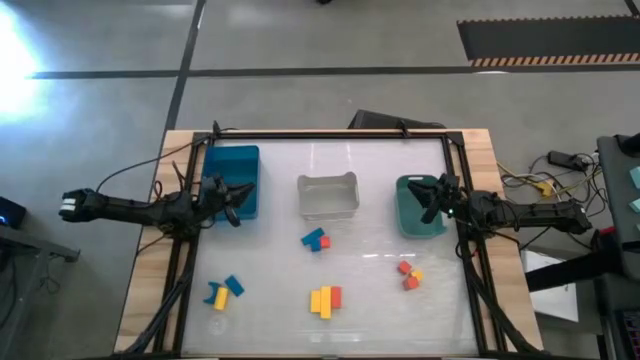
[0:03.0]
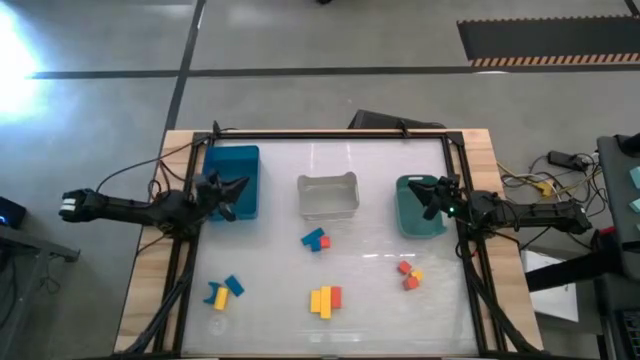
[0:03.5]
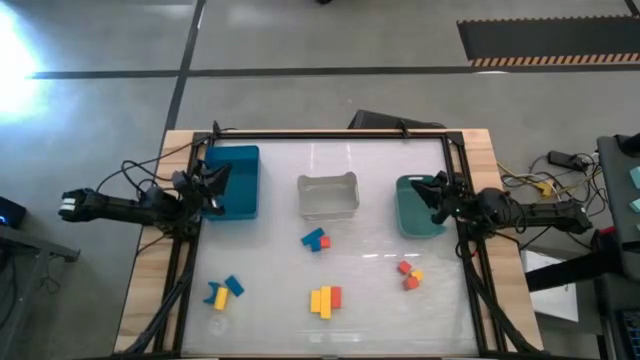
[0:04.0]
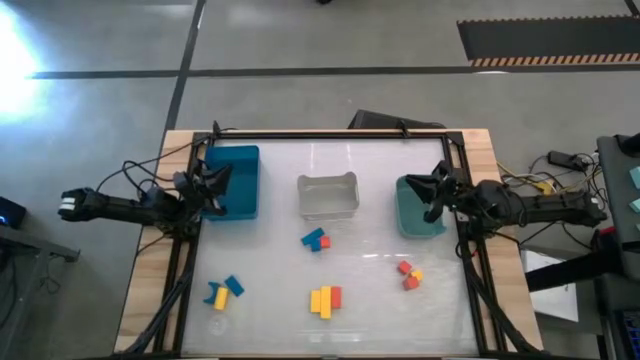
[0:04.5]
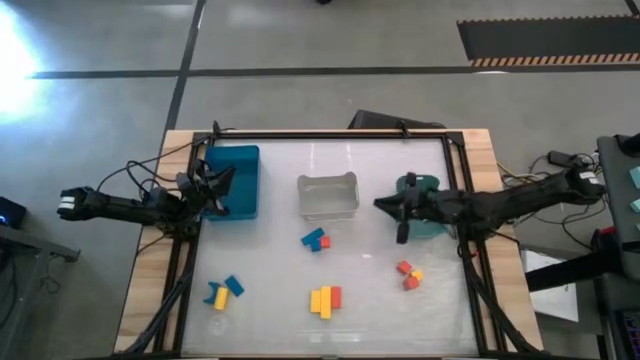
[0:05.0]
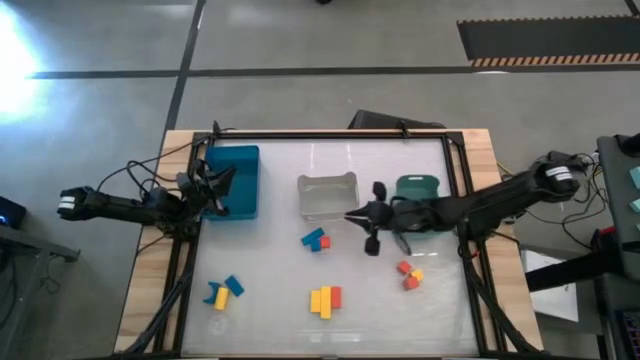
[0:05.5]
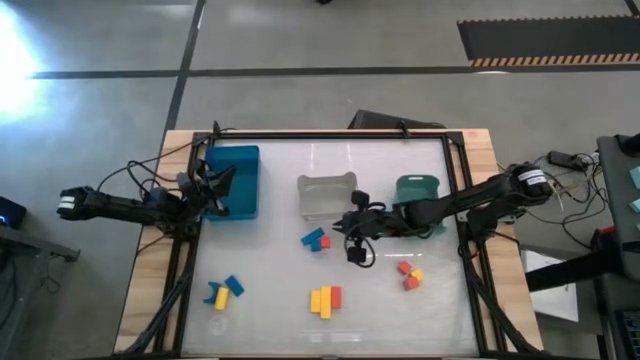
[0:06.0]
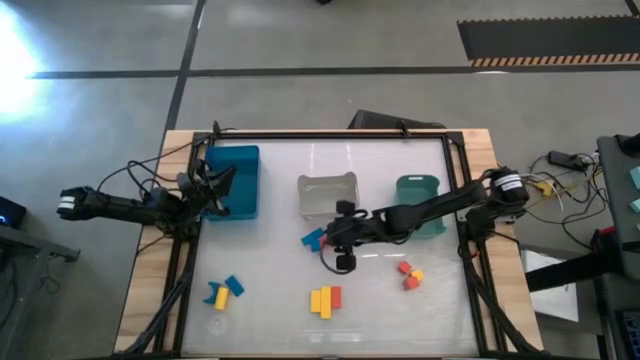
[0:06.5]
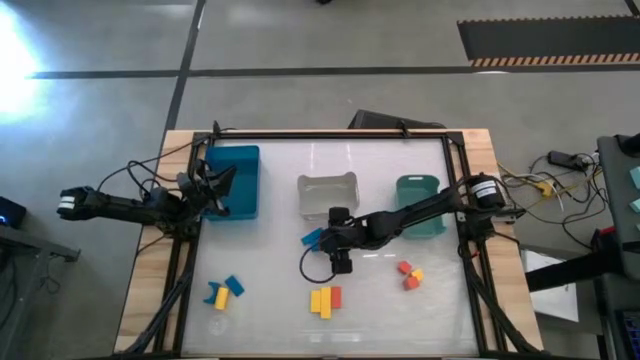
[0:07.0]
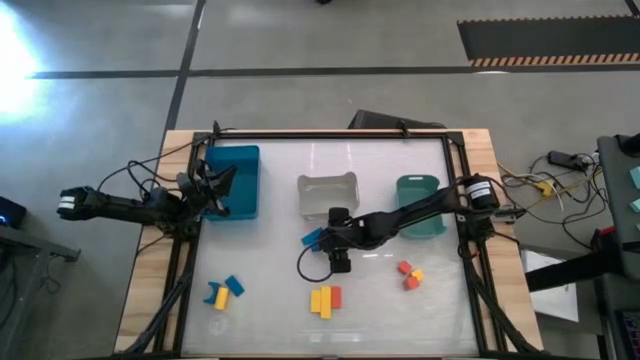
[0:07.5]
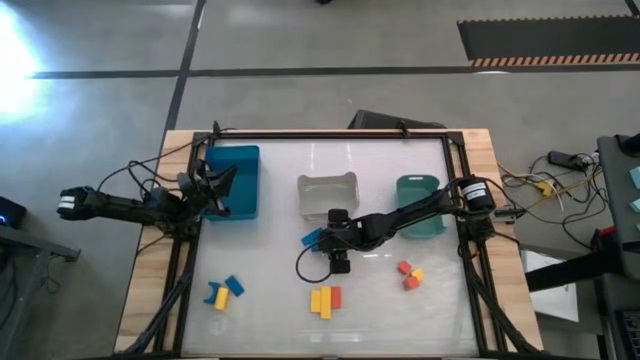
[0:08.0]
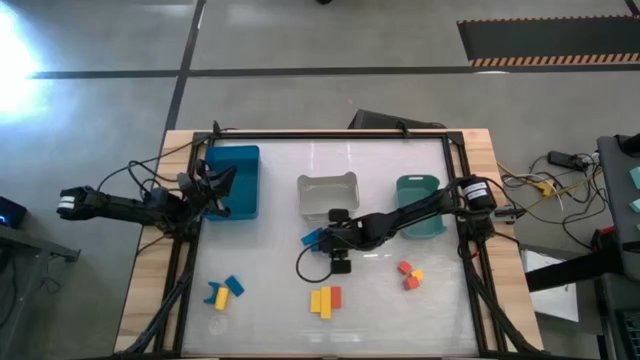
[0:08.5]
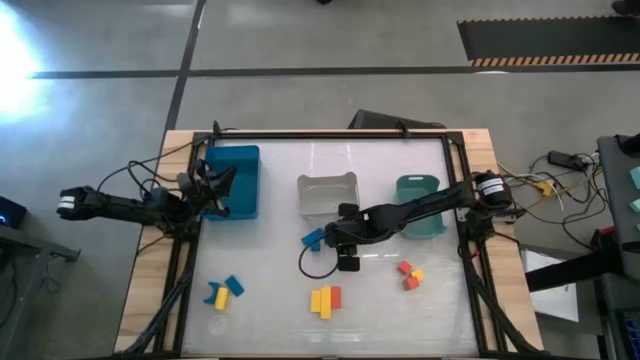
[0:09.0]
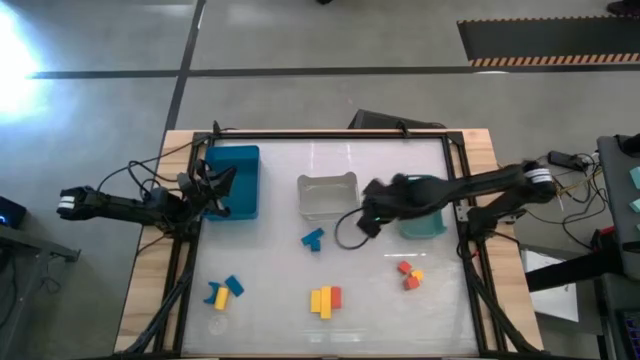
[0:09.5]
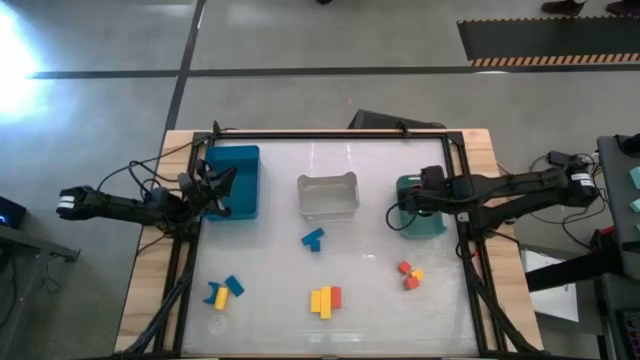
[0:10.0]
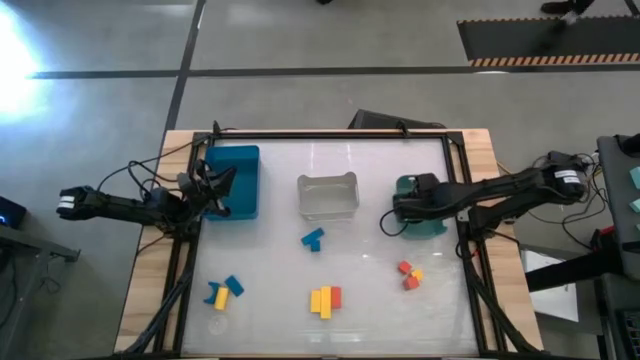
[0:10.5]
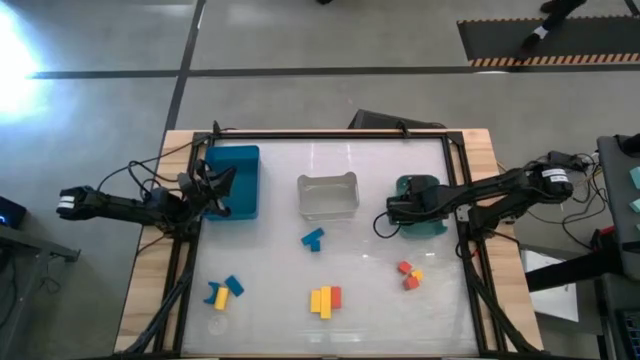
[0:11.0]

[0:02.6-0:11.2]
Task: Sort & place blocks by color
Put the orange block into the green bin

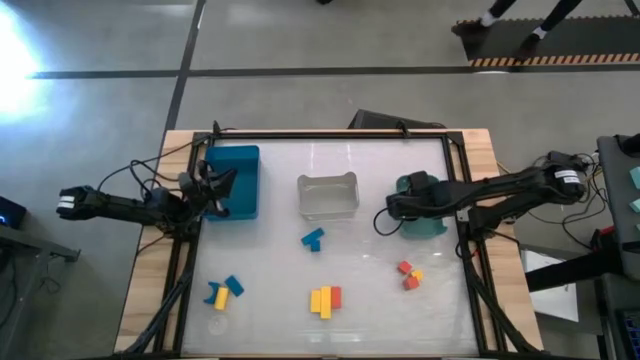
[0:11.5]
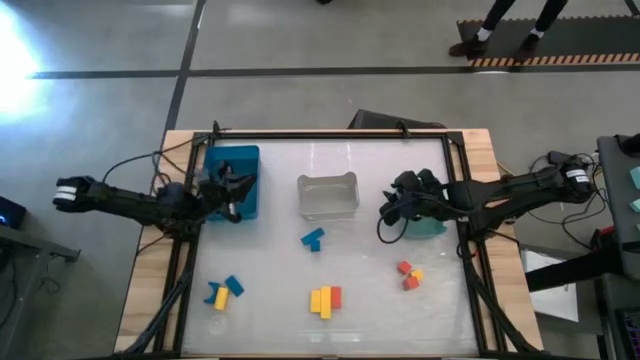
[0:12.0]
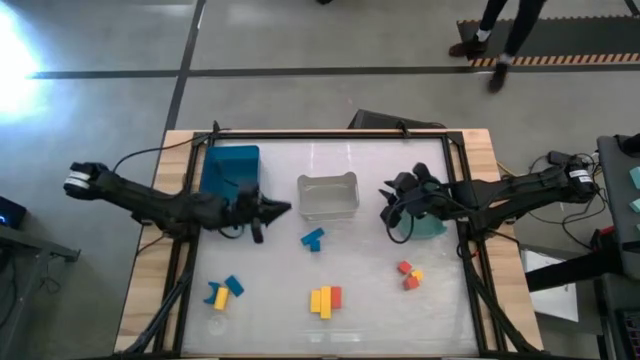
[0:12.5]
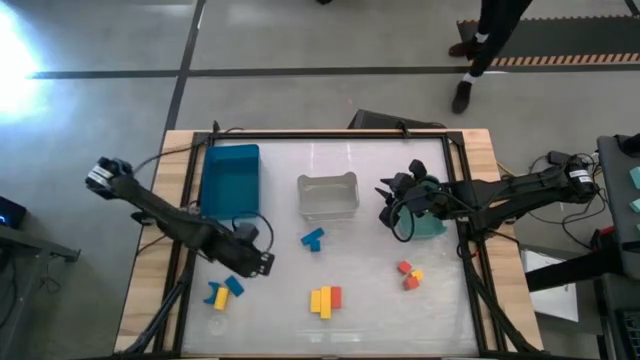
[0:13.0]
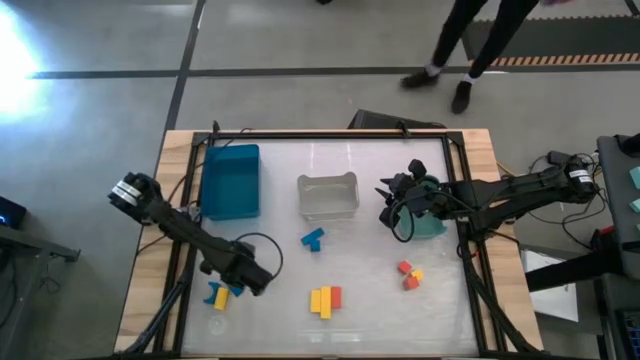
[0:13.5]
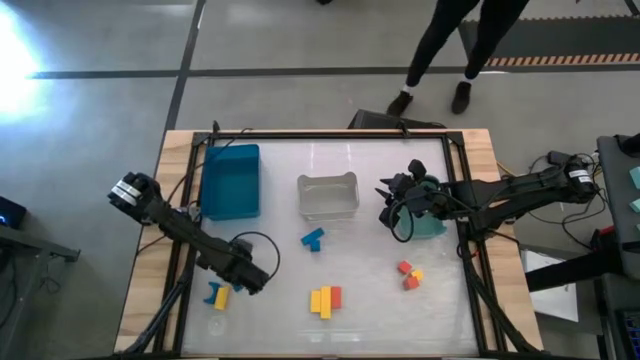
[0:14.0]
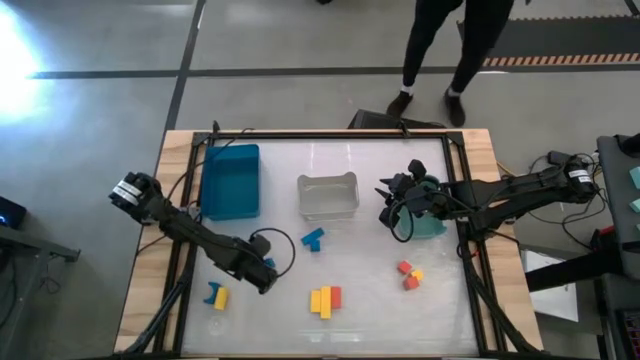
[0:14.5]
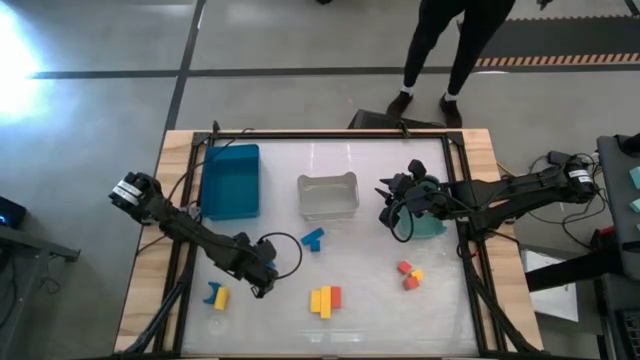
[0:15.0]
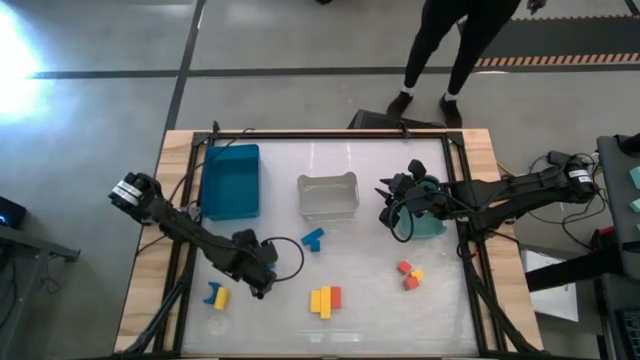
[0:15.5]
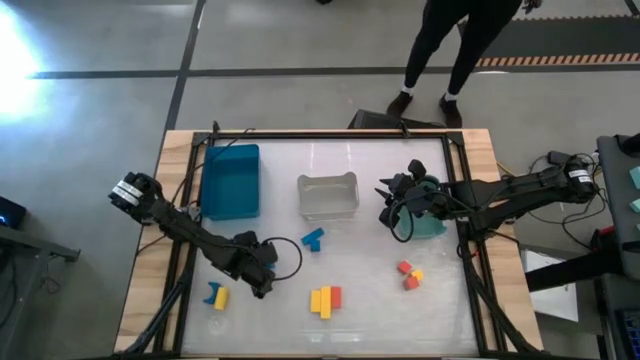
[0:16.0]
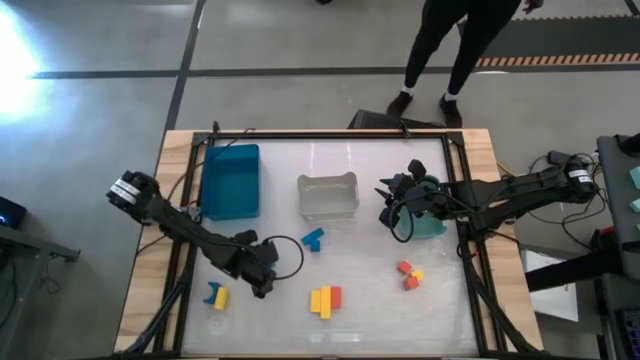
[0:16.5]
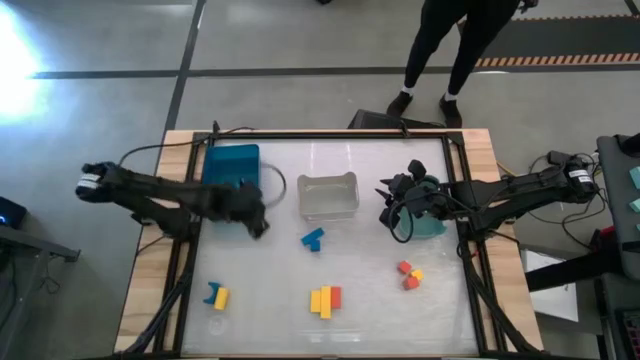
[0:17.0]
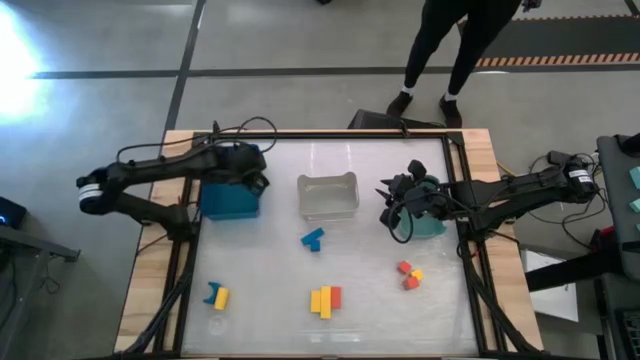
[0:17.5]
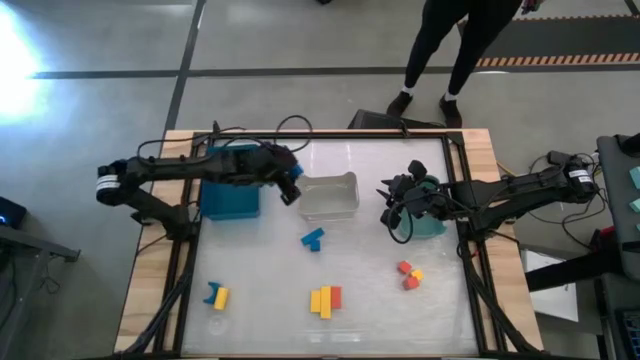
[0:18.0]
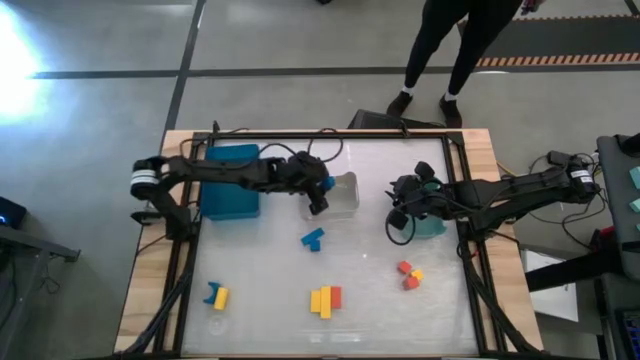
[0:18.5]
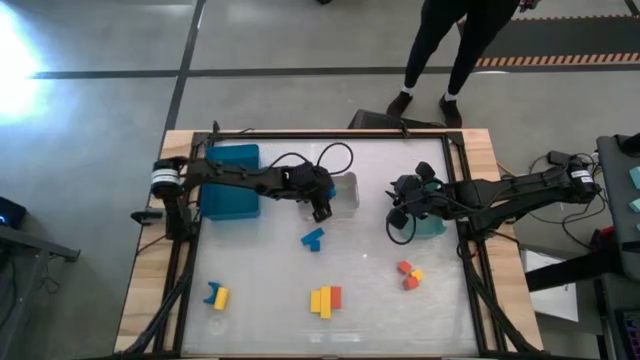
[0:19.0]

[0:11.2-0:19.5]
Put the blue block into the gray bin

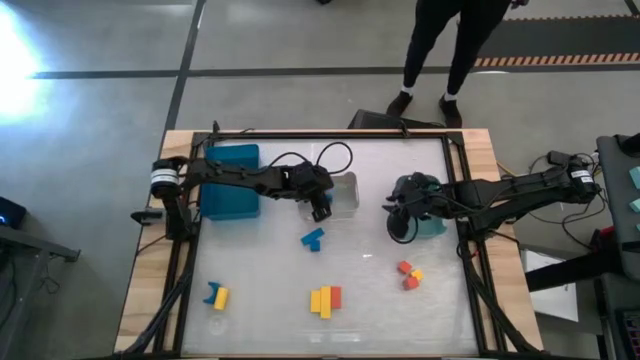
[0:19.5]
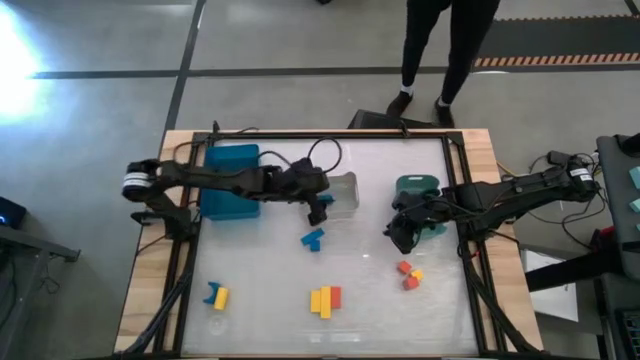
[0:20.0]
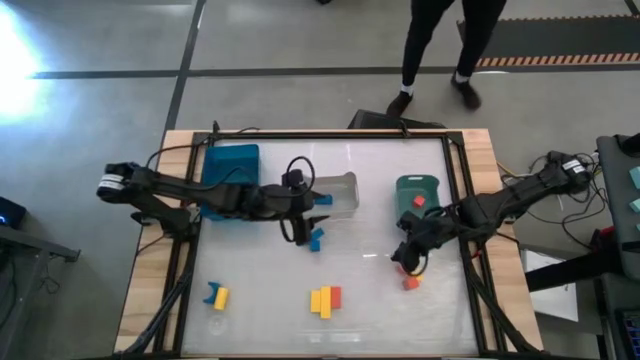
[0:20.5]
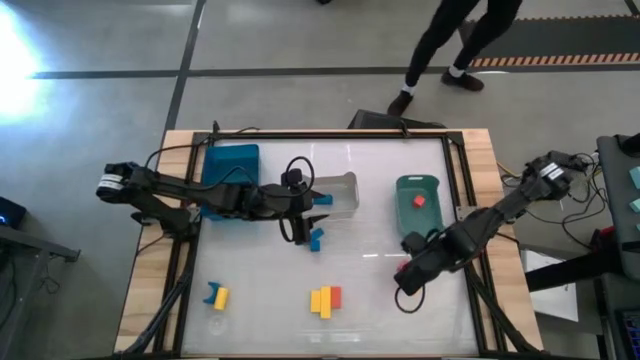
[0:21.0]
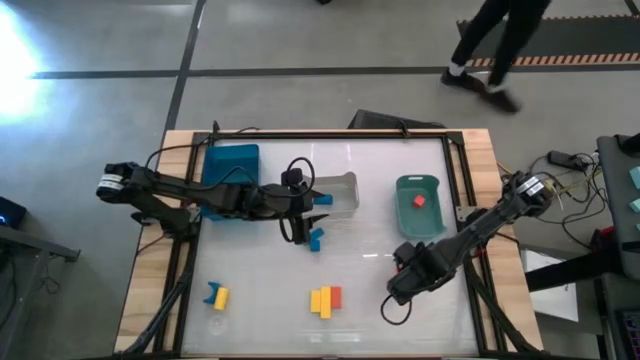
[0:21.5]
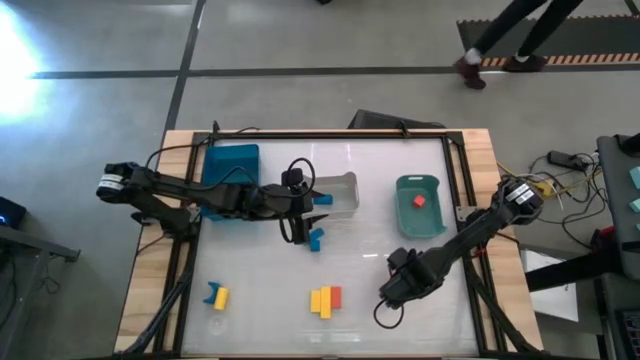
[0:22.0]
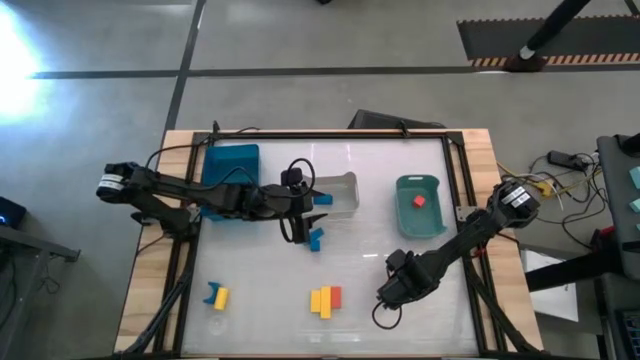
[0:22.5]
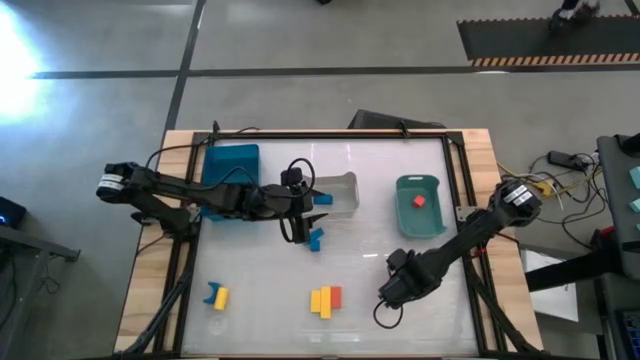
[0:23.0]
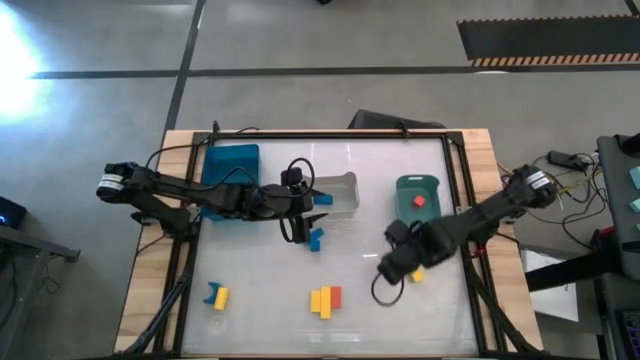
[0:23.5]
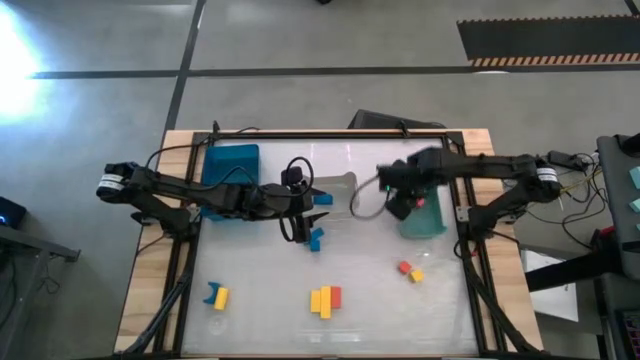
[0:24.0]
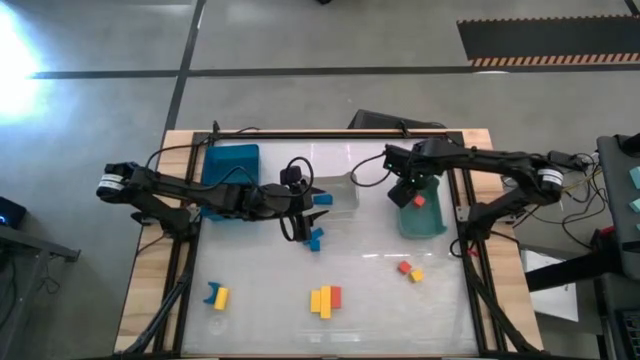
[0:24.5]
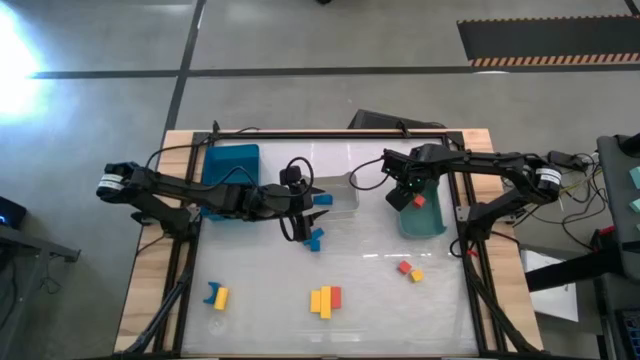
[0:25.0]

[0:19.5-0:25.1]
Put the orange block into the green bin
